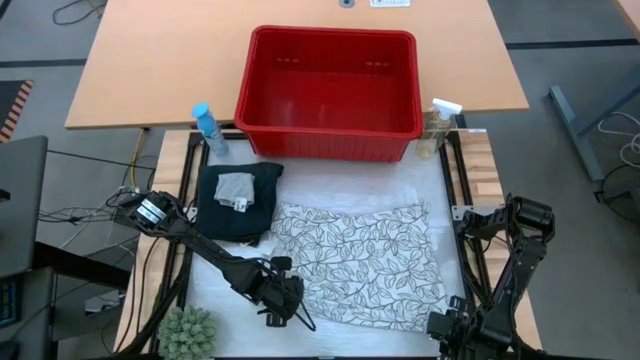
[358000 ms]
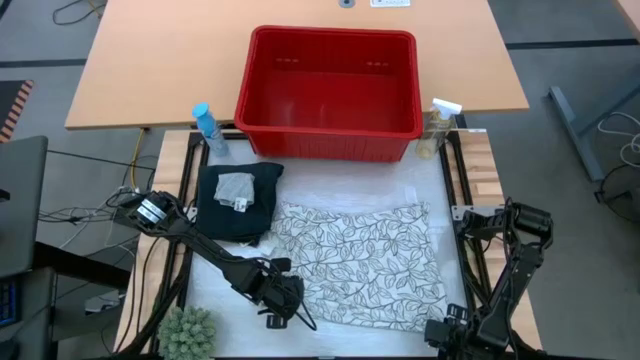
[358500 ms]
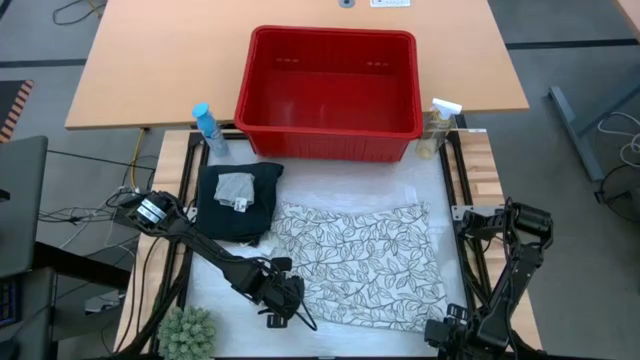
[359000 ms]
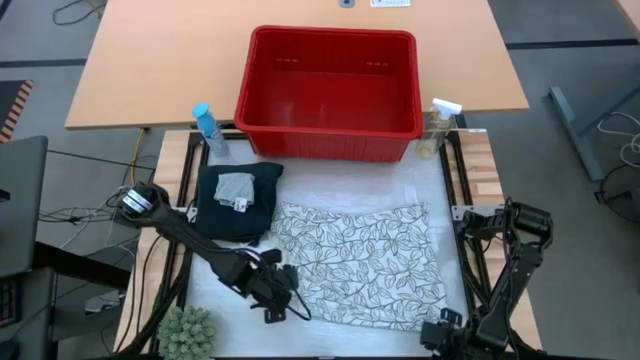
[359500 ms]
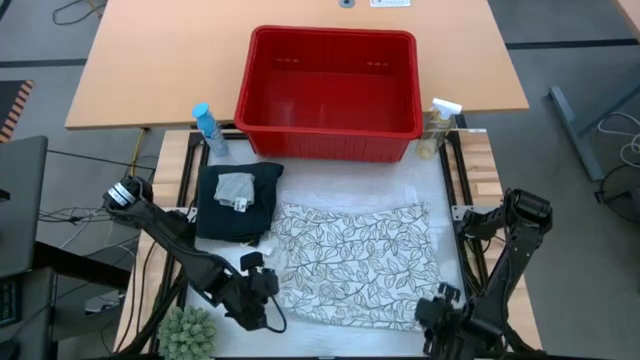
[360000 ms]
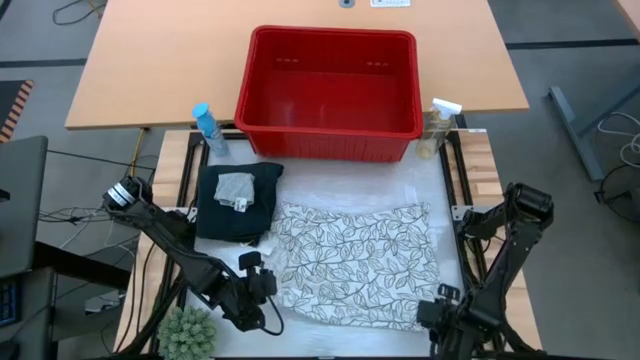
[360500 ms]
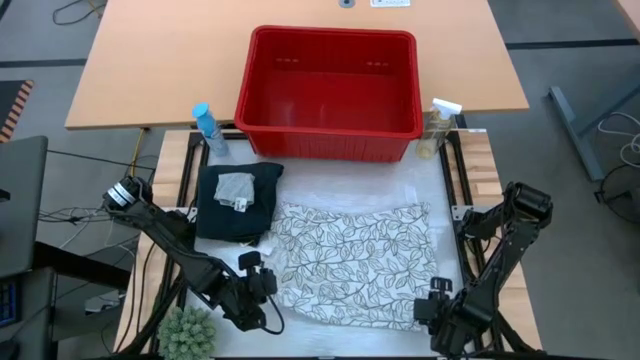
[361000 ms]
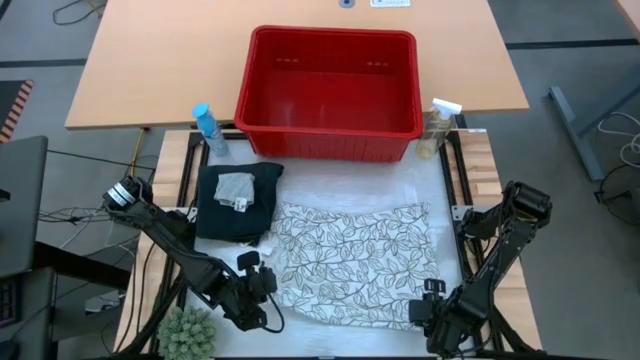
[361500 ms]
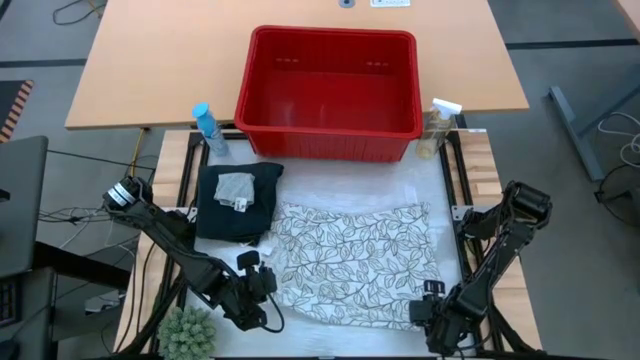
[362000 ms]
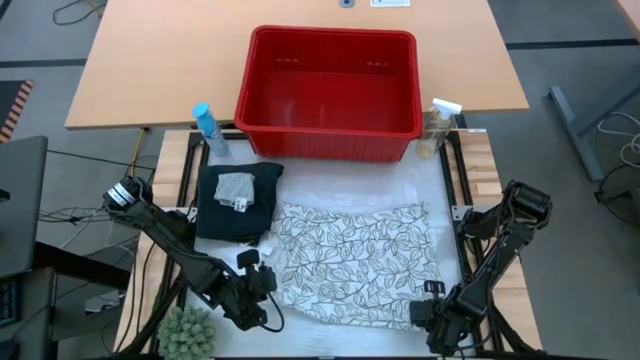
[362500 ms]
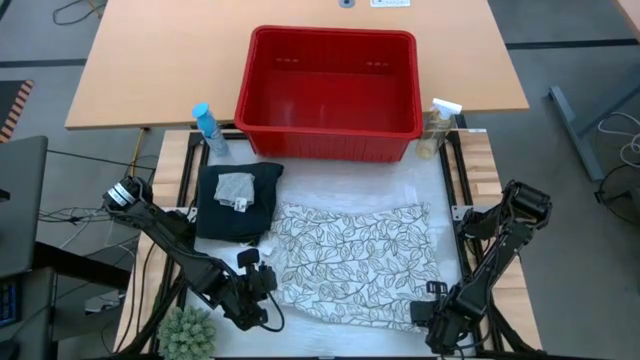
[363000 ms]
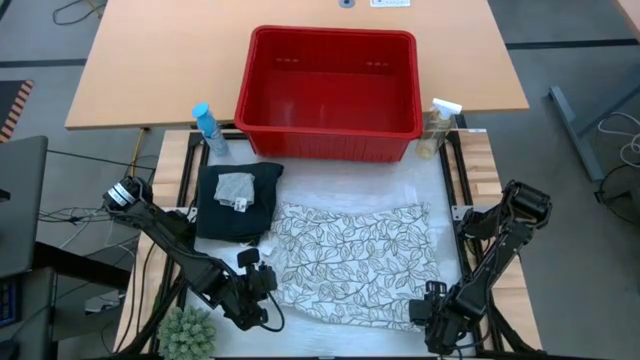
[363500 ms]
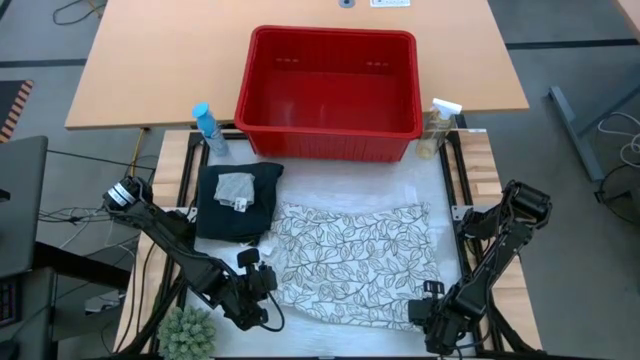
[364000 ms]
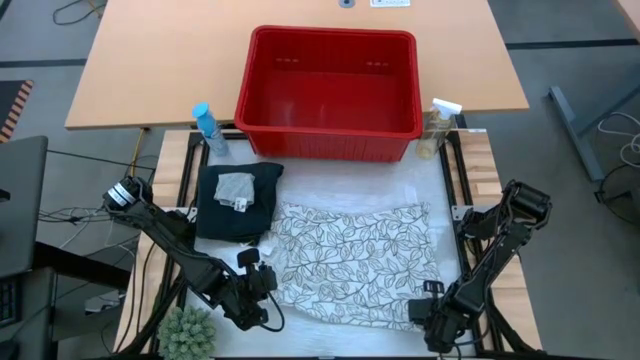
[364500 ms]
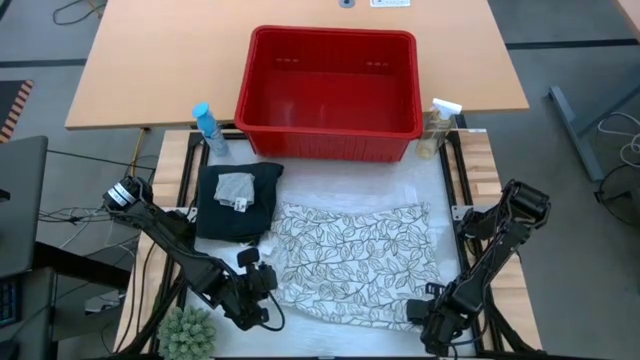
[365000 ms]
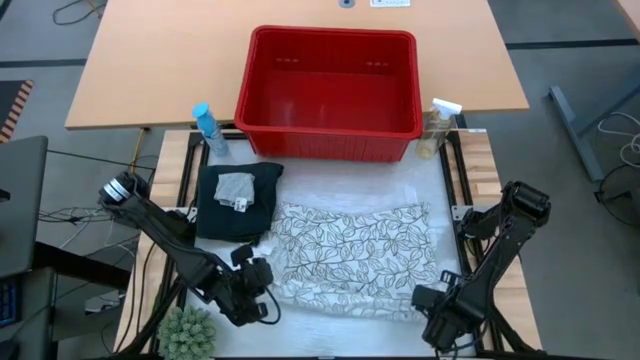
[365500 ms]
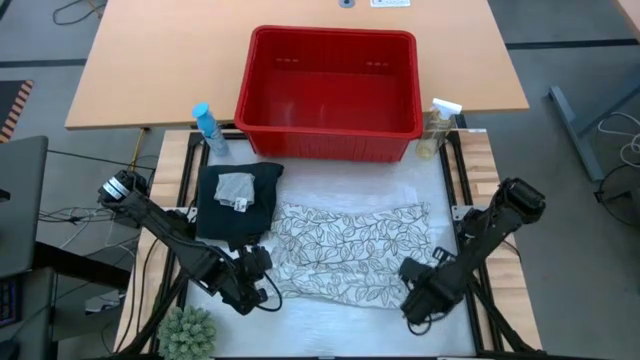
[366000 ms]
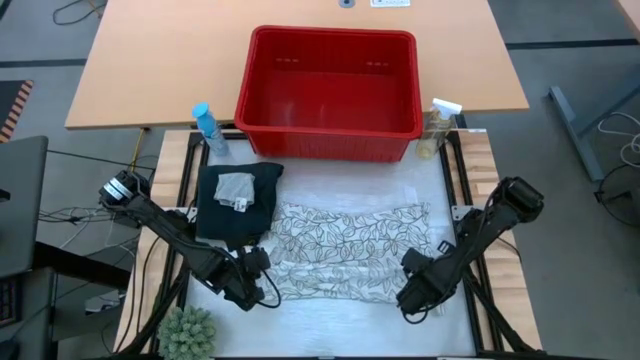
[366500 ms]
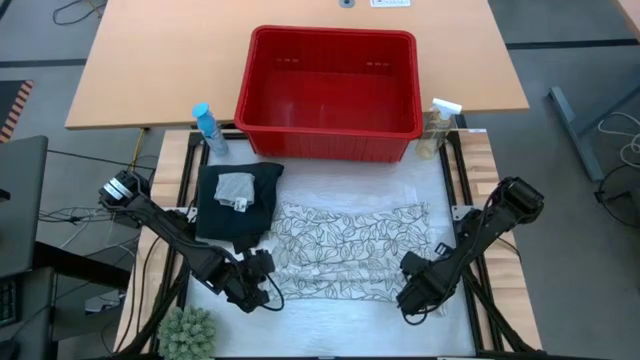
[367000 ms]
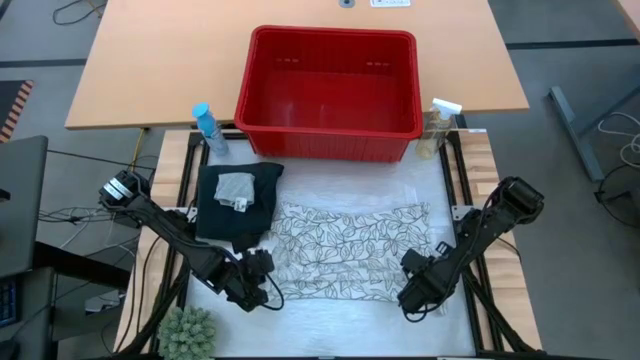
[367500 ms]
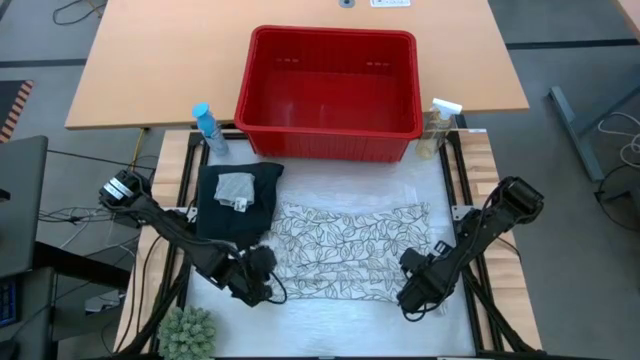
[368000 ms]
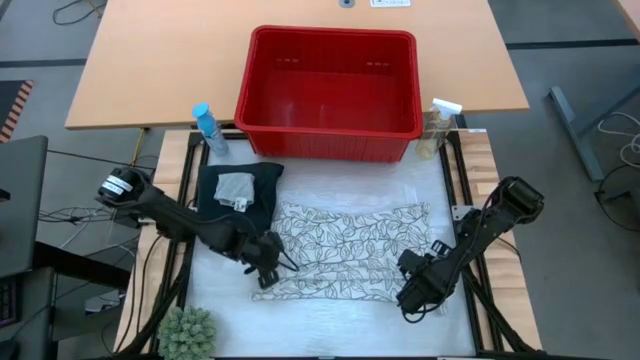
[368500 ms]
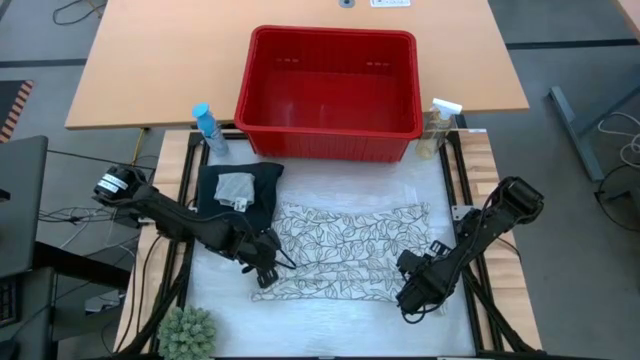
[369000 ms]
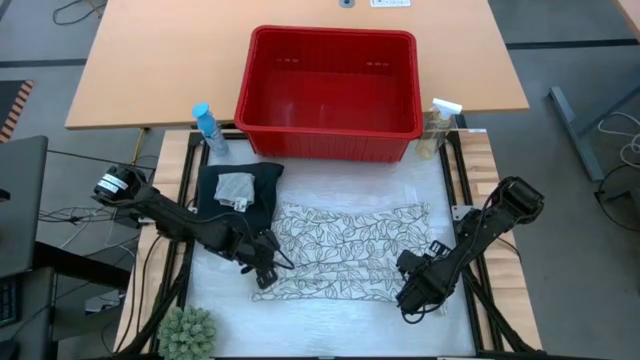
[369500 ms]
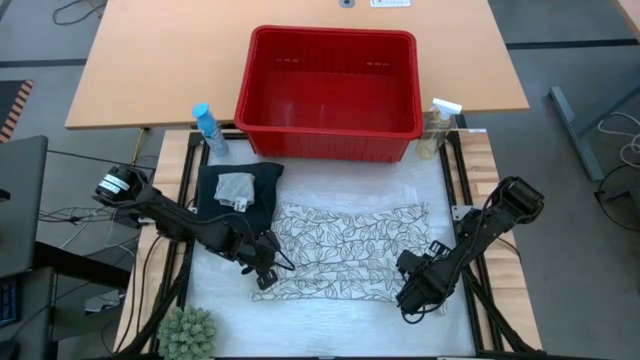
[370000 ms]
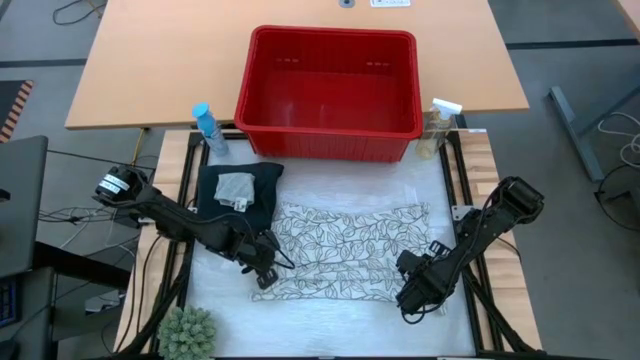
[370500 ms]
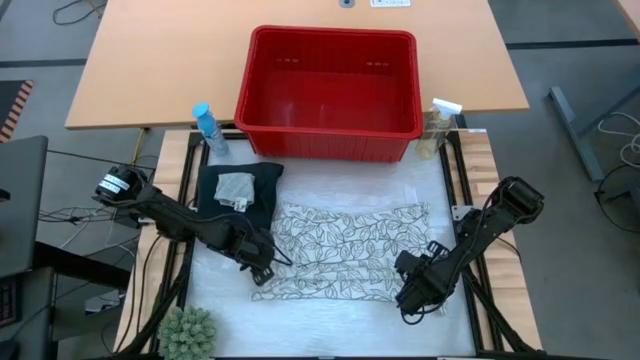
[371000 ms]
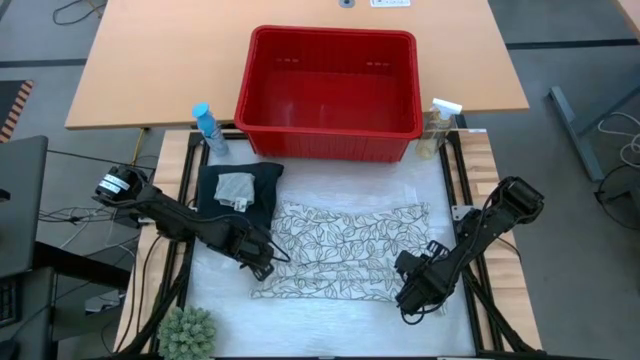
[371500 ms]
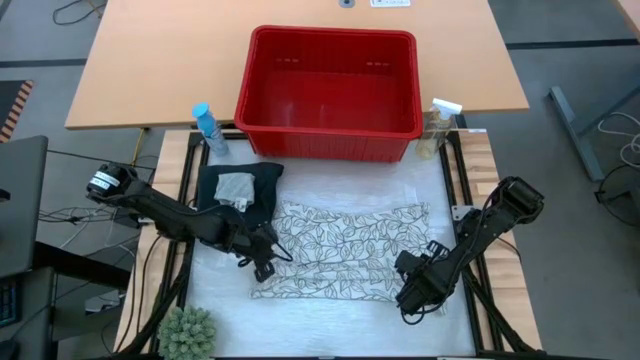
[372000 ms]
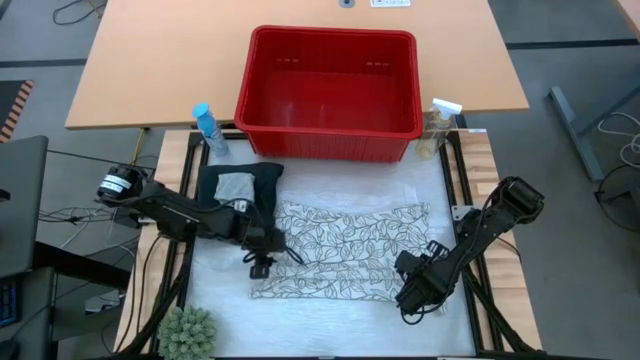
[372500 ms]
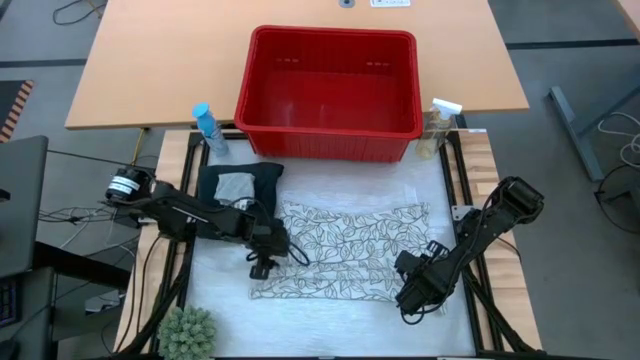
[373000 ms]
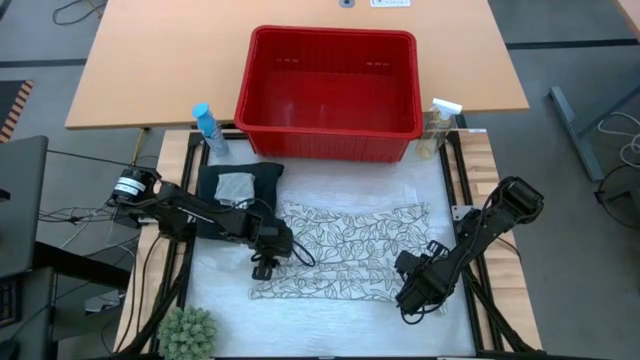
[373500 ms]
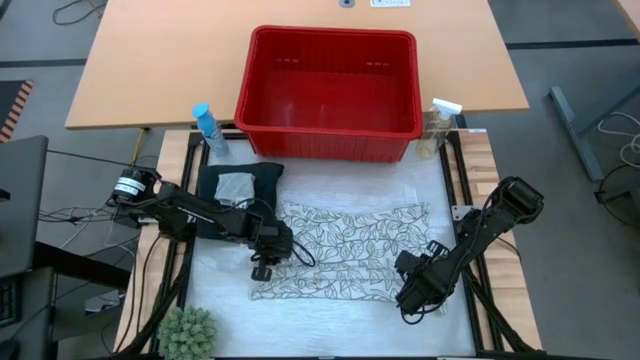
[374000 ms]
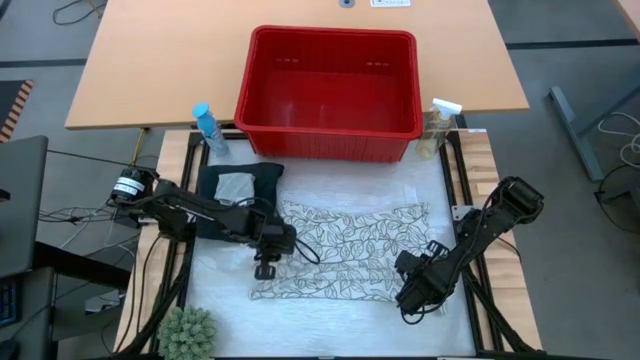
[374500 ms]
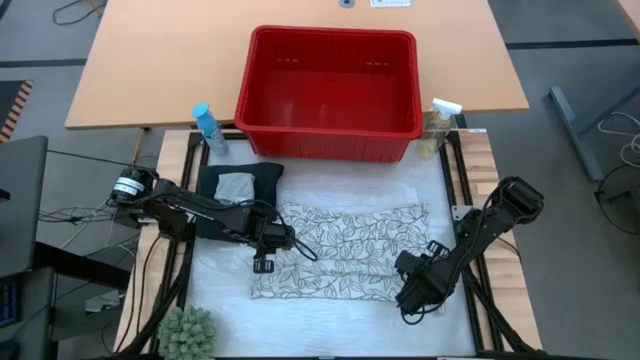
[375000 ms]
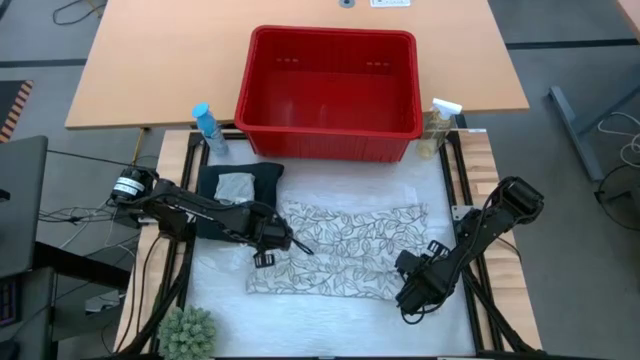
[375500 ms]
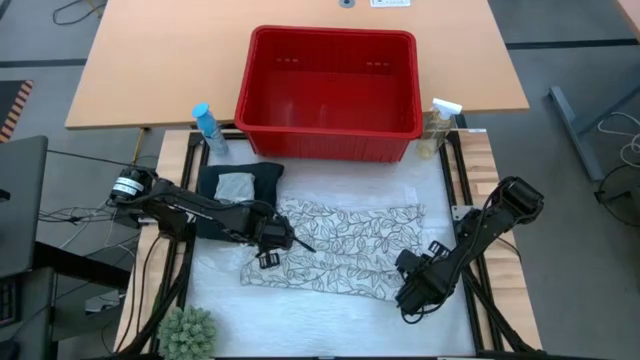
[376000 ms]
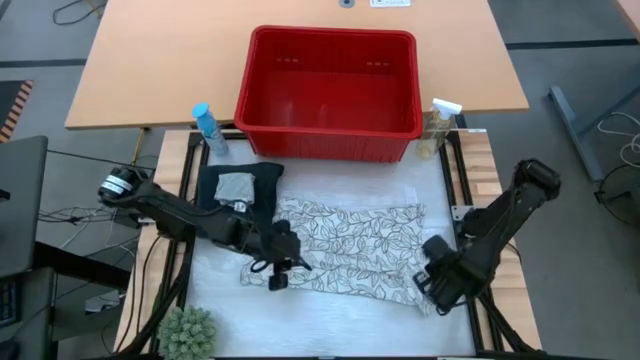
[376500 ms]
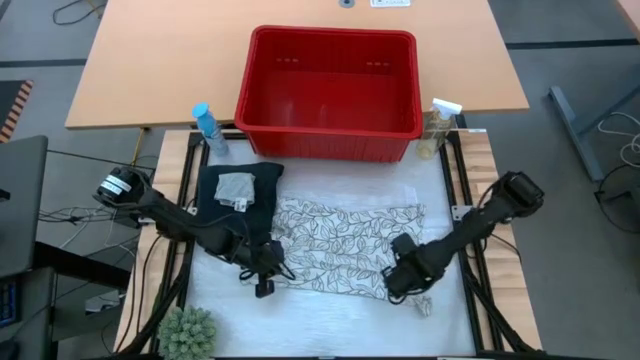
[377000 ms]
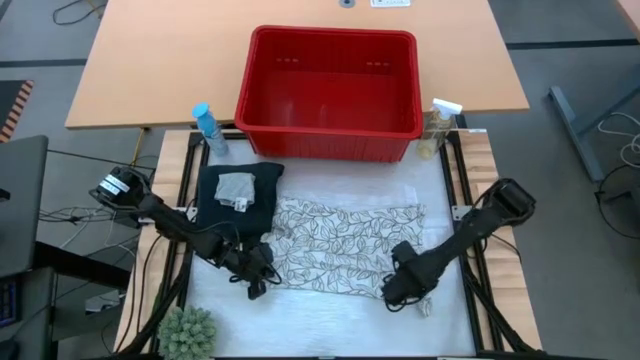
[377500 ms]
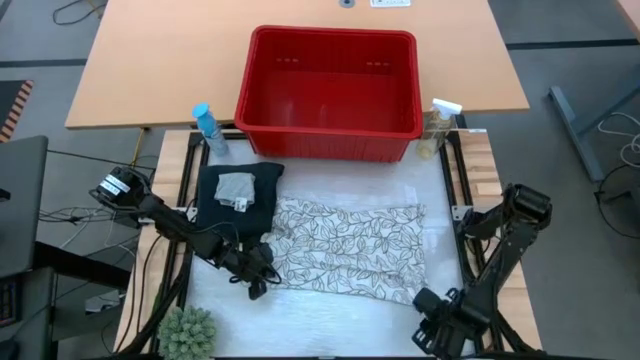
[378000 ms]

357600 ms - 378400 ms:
Task: Fold Laundry from Bin
Fold the white patterned shirt
